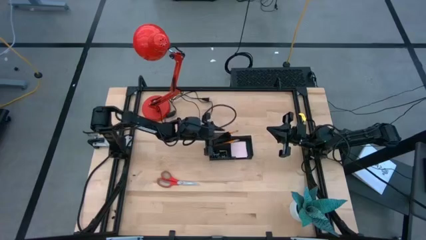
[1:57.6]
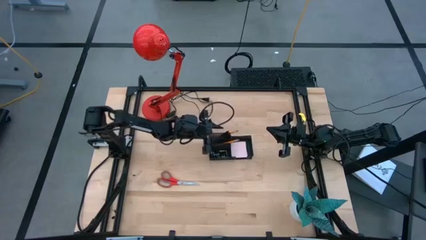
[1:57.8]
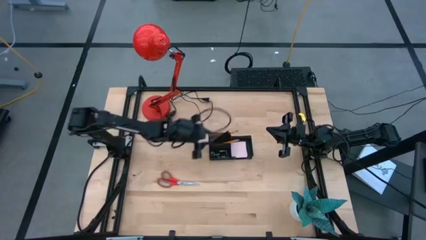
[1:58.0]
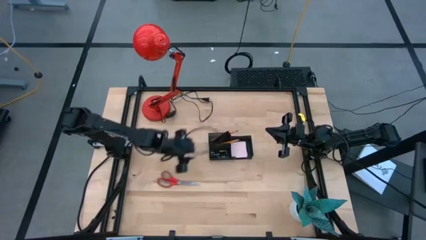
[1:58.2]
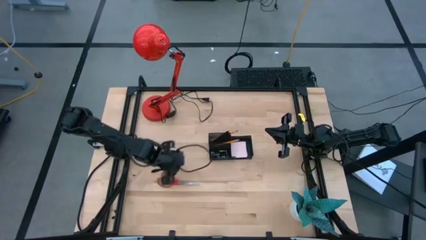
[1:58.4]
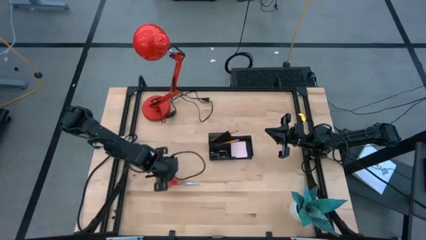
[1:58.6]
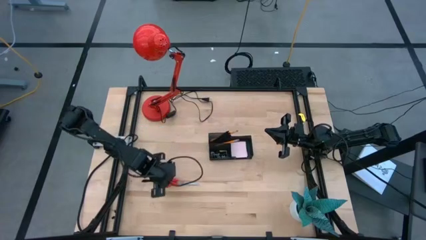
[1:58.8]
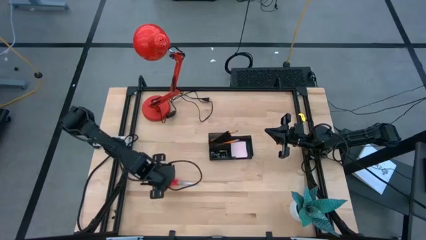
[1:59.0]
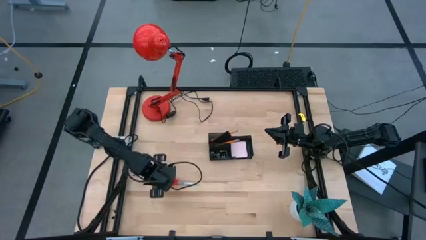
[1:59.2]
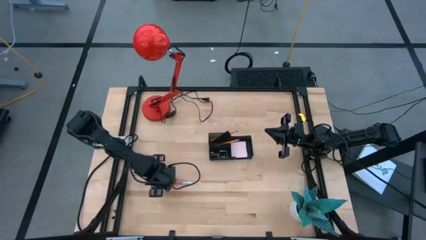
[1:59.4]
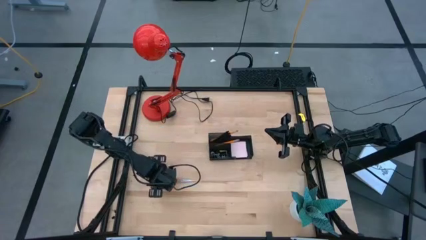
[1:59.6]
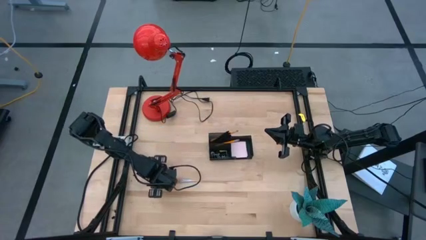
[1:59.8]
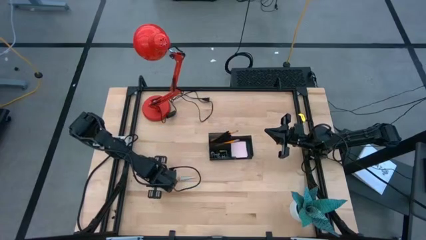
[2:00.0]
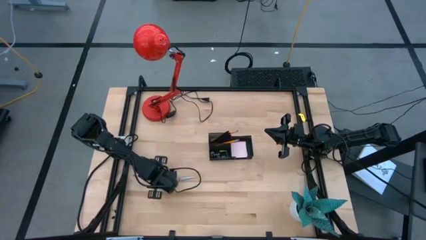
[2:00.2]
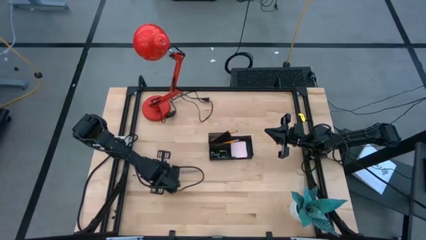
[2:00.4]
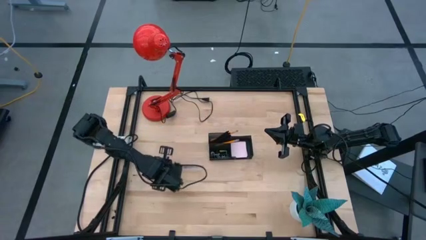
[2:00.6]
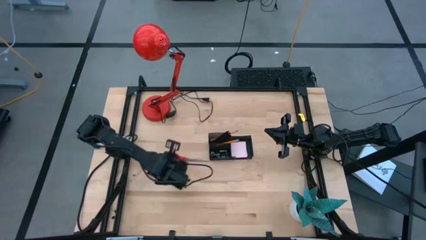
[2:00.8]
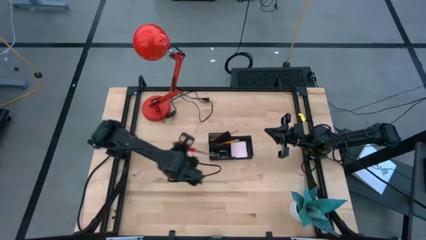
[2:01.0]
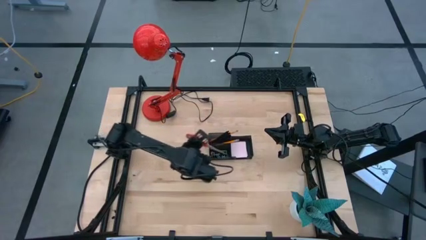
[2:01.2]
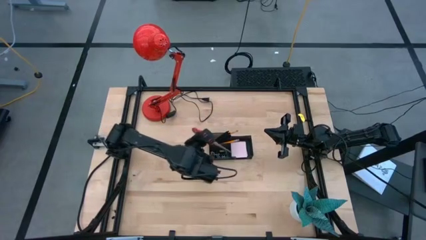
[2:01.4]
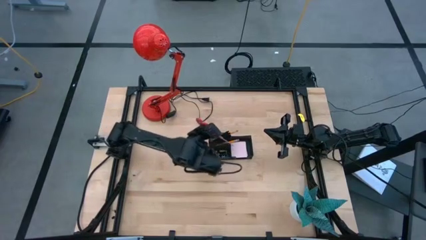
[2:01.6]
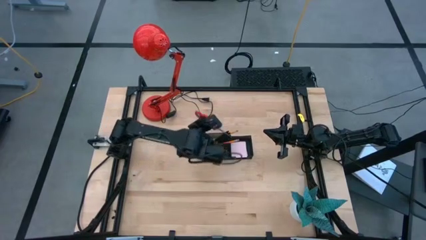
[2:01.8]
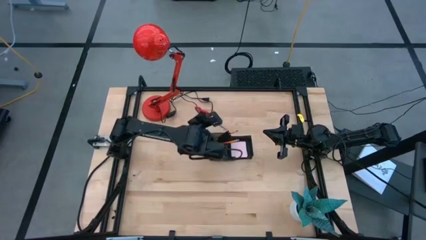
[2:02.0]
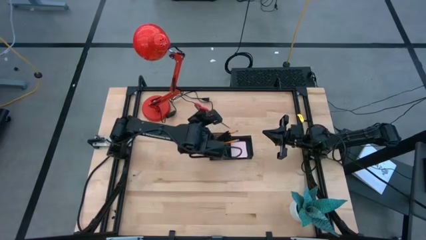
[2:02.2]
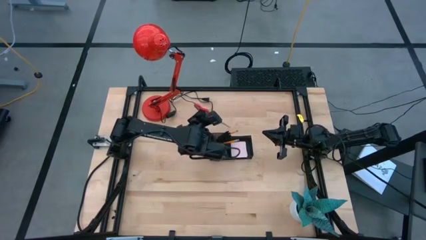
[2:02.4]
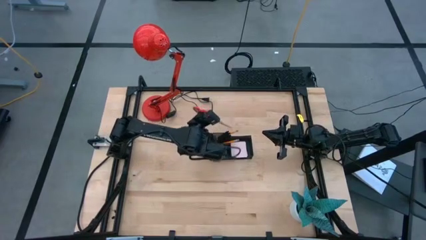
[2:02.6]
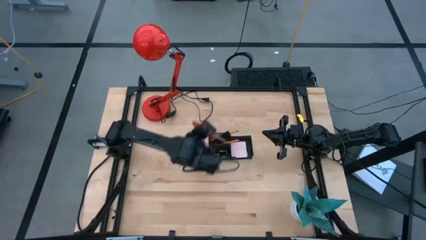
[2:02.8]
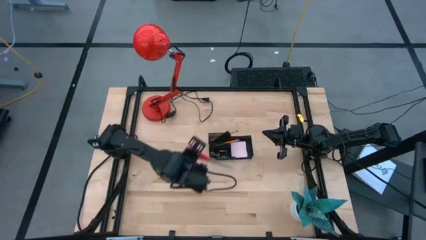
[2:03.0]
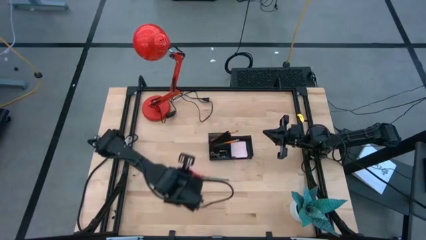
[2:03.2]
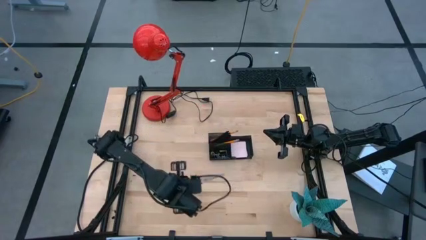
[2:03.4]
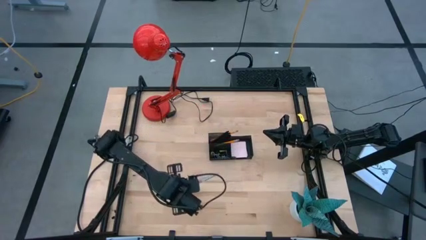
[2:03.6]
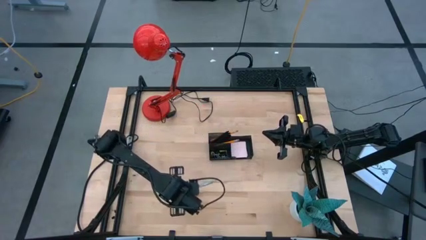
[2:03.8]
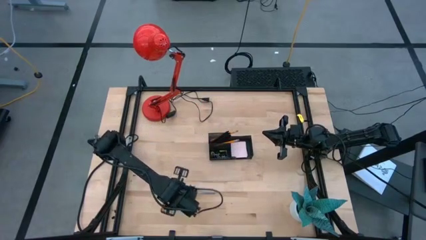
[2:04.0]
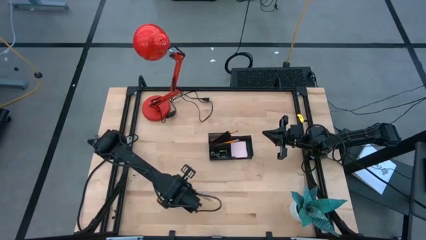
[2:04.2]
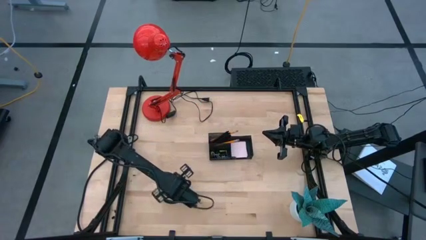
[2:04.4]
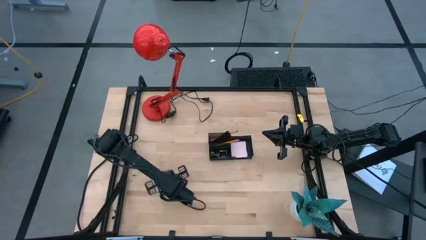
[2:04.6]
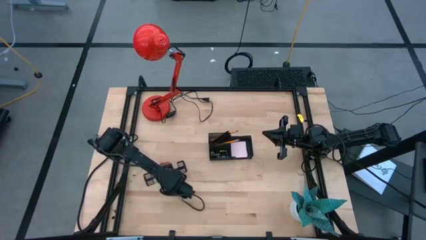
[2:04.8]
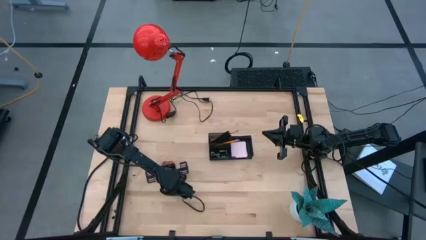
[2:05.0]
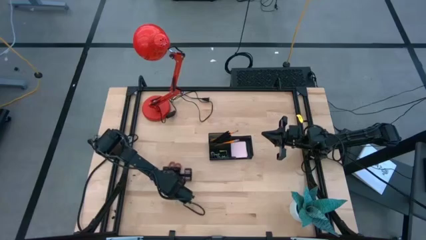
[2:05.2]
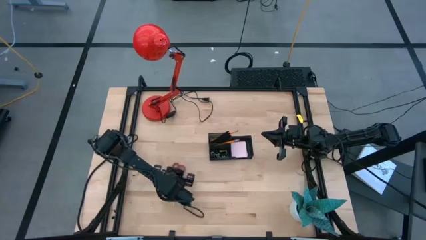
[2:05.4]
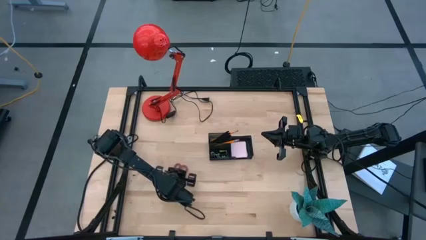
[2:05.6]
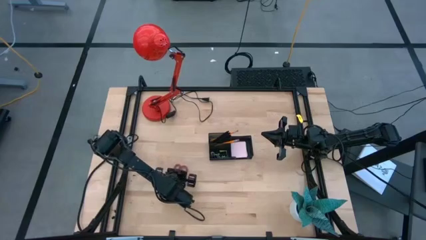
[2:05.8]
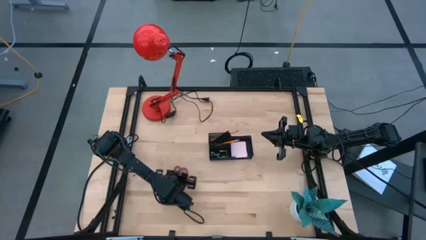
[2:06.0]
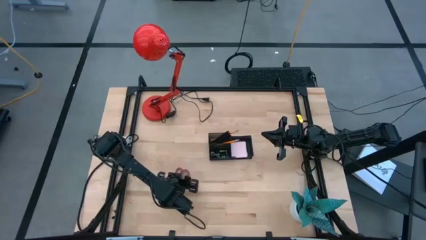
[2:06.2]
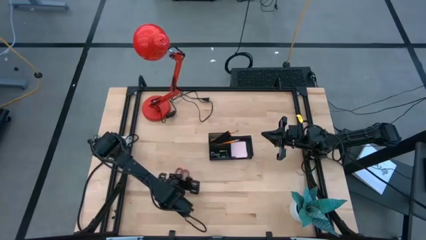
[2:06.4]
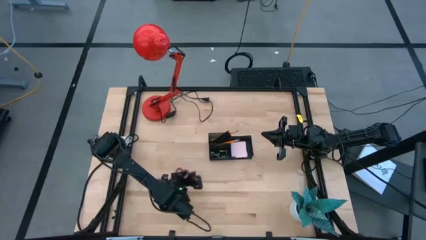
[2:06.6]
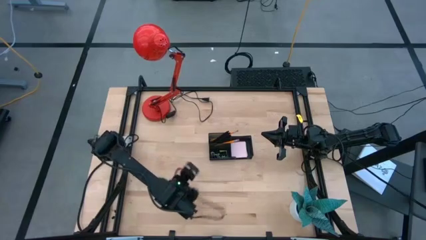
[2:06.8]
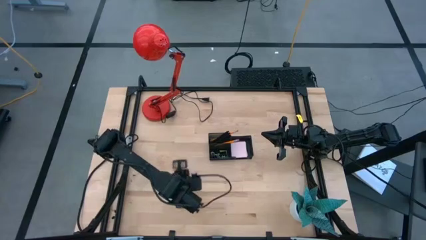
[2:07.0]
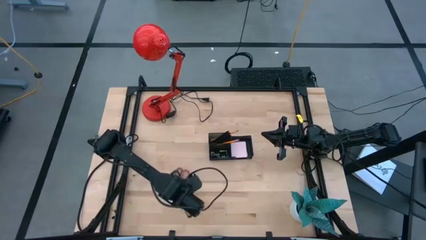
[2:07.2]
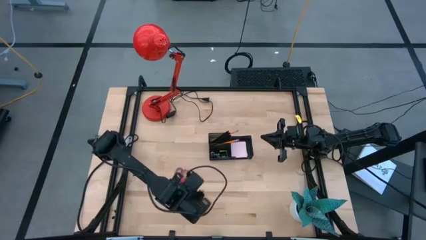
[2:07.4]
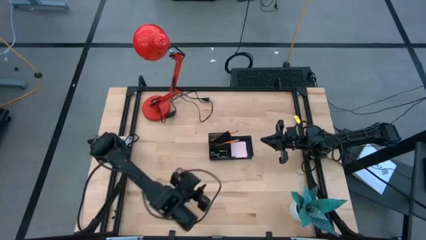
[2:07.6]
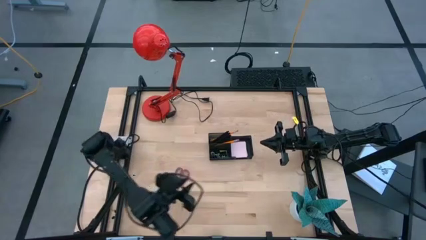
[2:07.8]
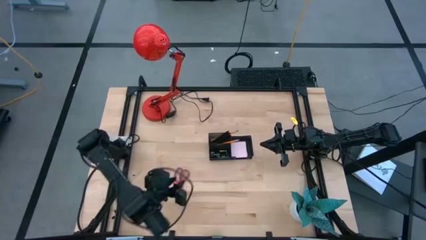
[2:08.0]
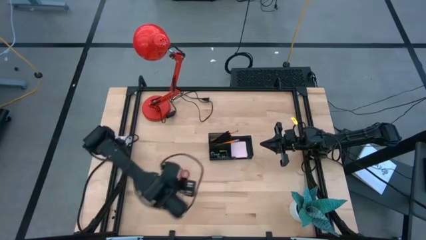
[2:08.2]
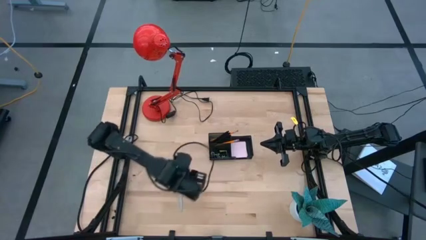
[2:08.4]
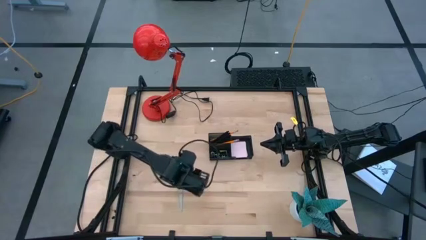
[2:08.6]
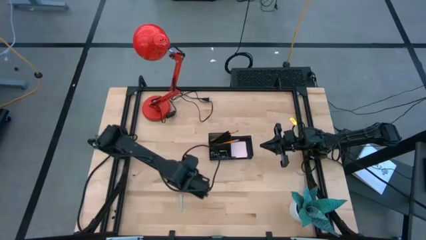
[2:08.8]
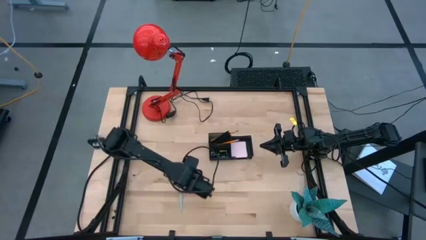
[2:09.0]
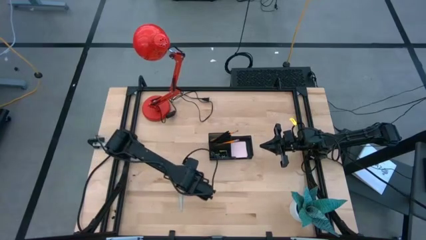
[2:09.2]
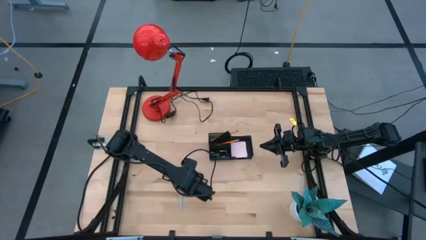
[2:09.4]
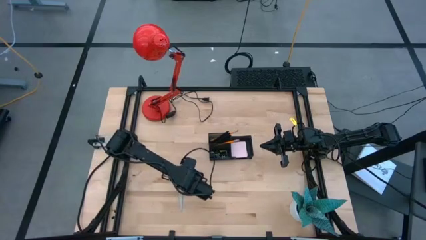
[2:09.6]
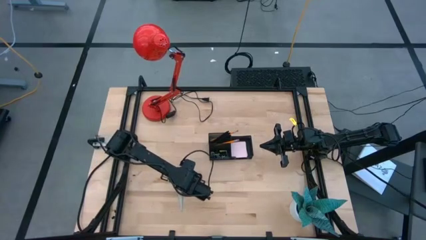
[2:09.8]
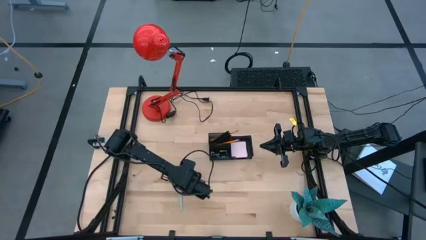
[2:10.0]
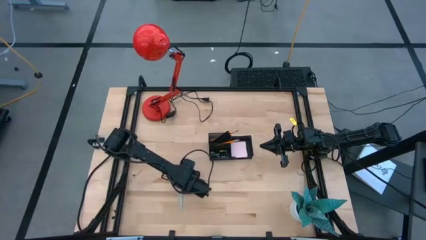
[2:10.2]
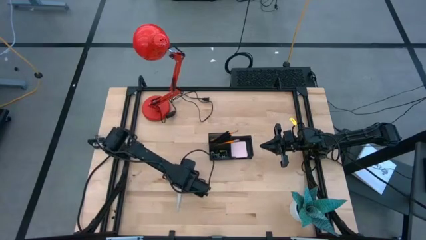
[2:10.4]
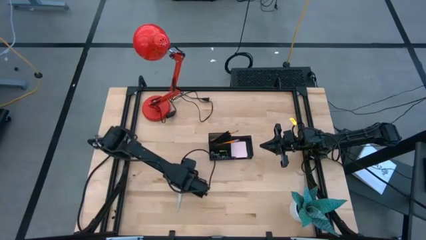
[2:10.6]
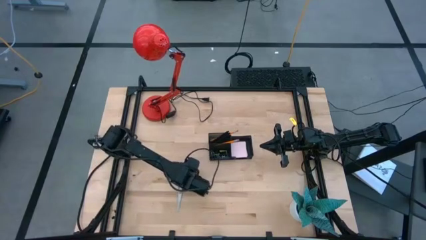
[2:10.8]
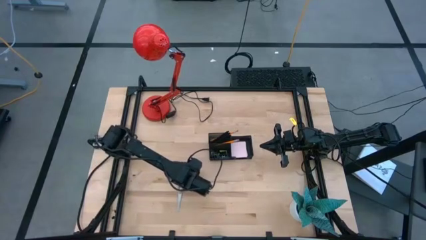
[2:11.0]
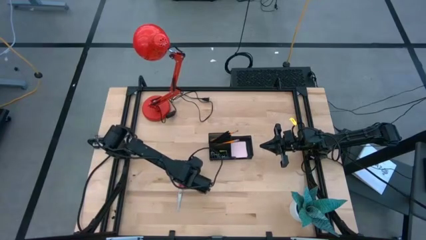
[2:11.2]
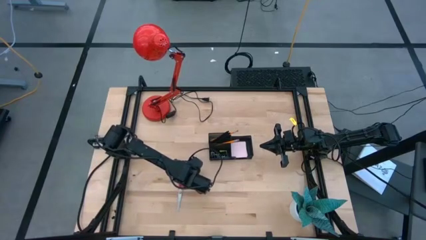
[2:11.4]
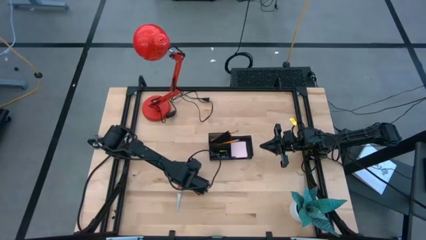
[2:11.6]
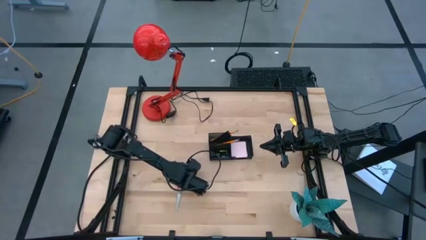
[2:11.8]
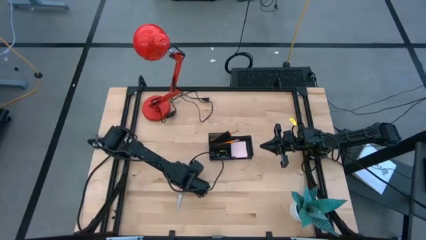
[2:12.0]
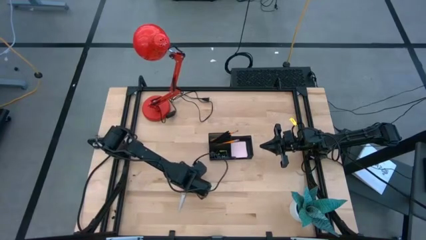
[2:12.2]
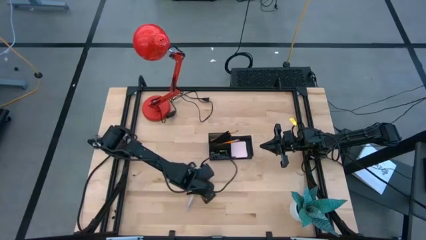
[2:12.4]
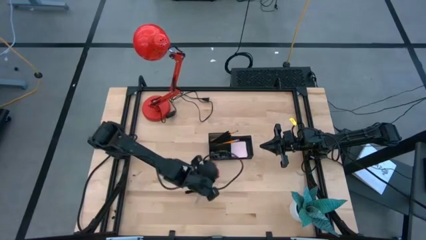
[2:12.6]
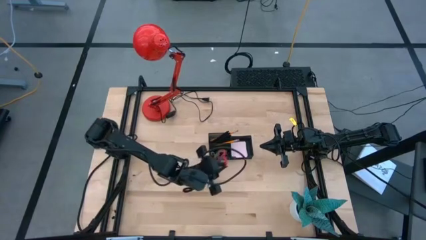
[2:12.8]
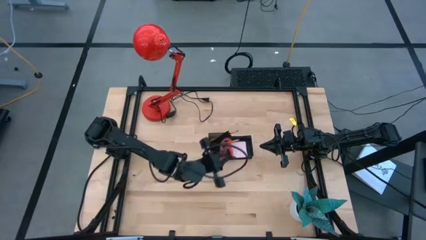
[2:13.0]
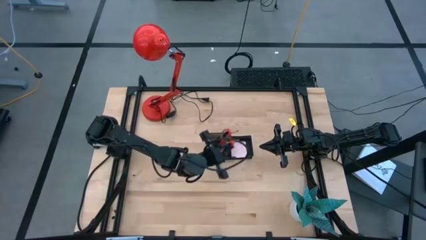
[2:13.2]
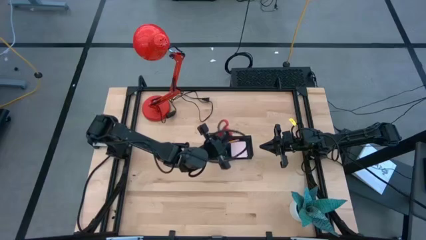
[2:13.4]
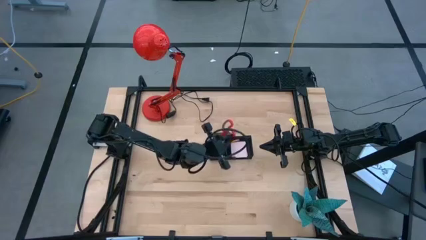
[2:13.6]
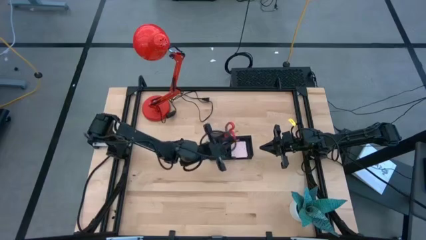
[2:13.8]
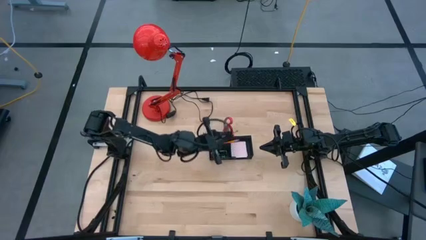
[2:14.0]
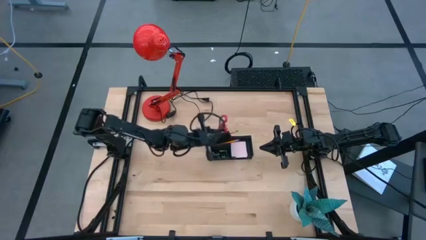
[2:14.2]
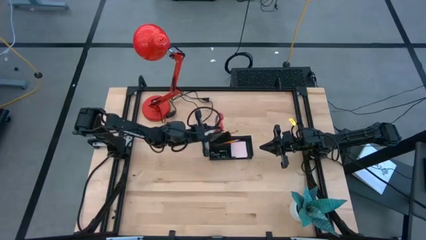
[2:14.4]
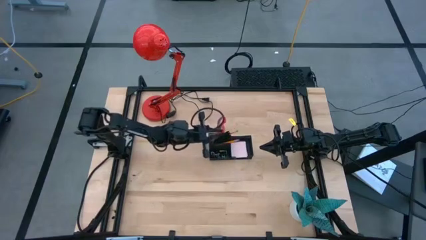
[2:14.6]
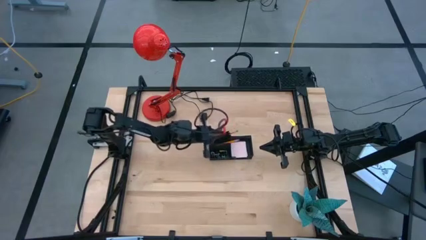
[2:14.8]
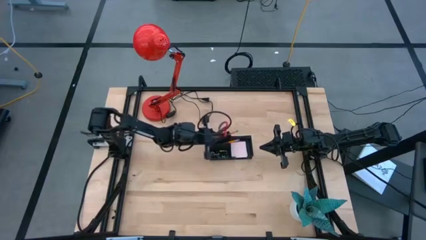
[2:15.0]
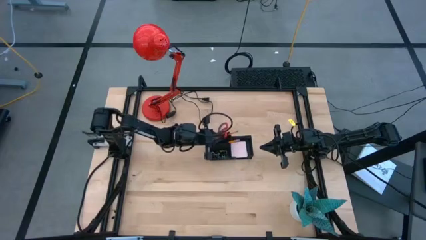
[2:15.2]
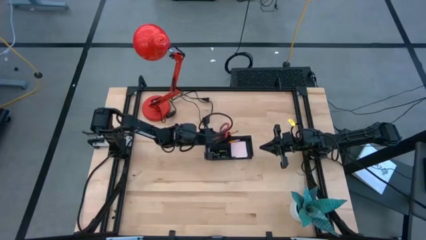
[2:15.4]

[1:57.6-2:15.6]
Task: Pick and place office supplies into organizer
Put the orange scissor into the black desk organizer
